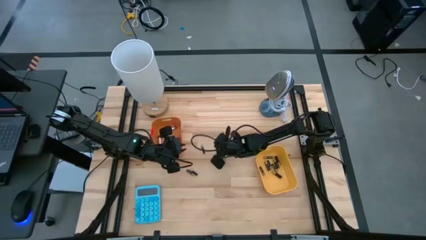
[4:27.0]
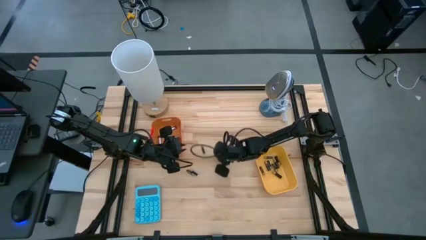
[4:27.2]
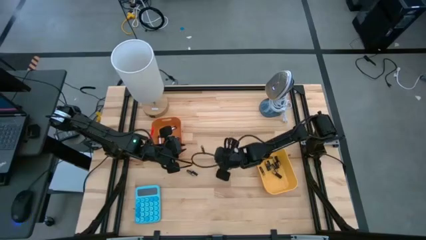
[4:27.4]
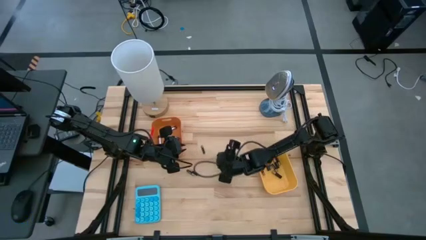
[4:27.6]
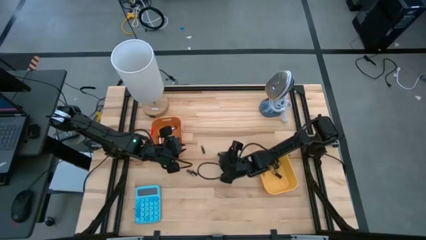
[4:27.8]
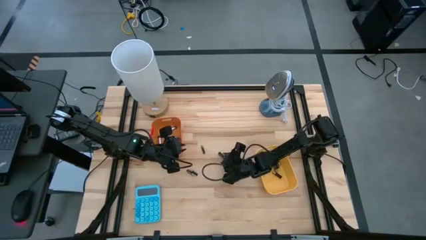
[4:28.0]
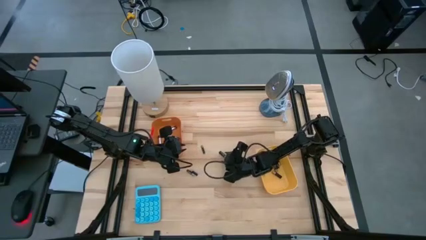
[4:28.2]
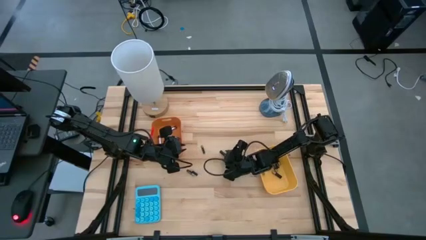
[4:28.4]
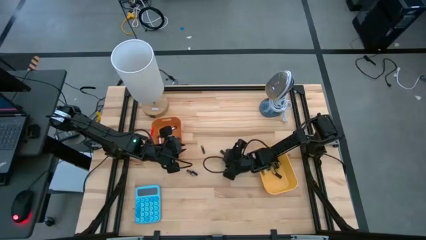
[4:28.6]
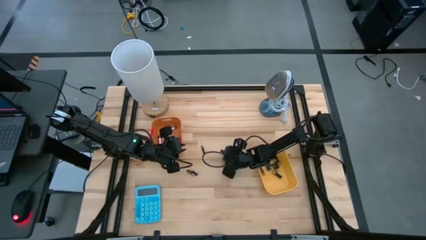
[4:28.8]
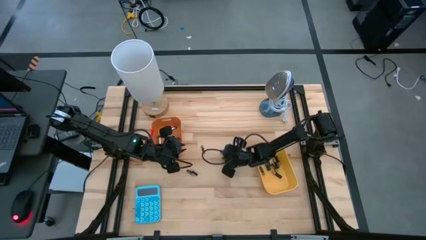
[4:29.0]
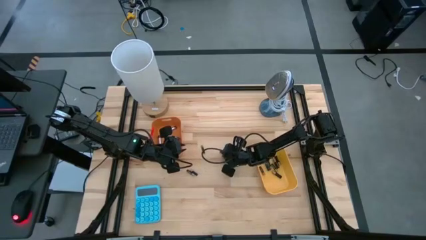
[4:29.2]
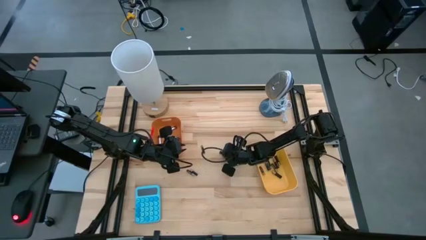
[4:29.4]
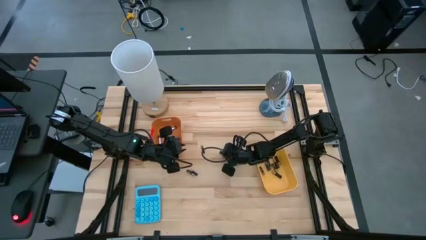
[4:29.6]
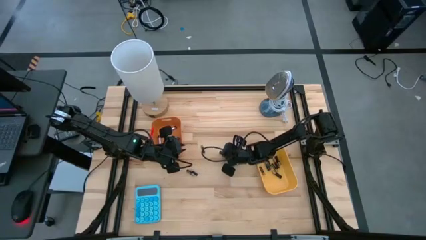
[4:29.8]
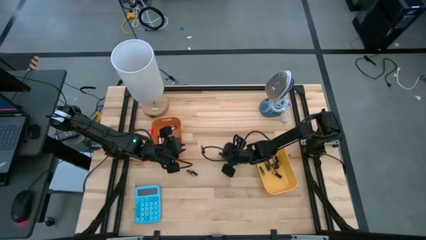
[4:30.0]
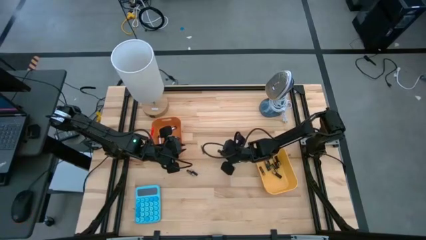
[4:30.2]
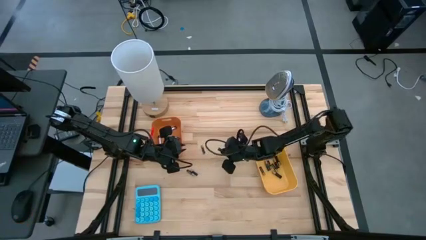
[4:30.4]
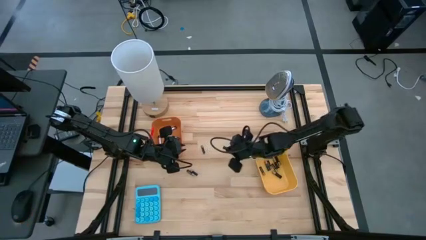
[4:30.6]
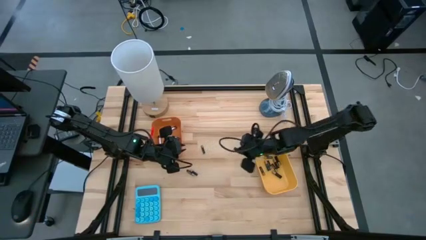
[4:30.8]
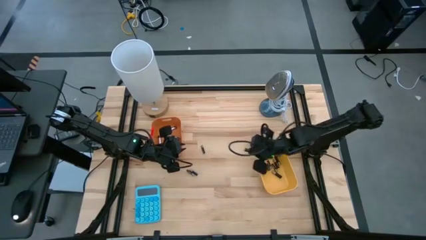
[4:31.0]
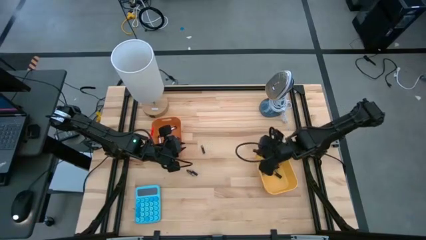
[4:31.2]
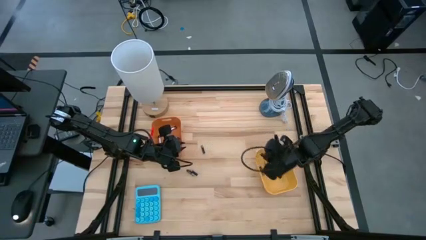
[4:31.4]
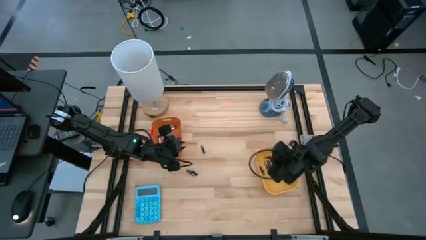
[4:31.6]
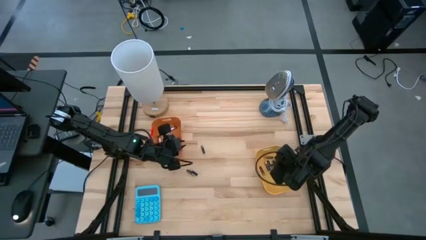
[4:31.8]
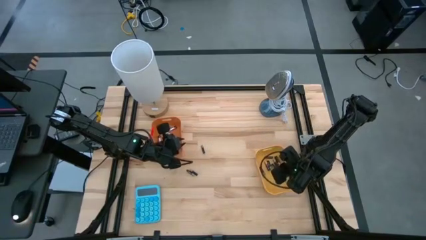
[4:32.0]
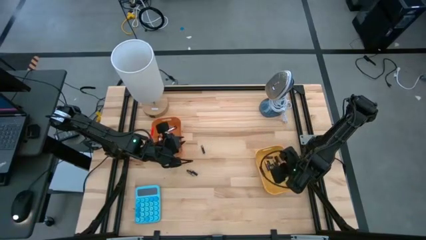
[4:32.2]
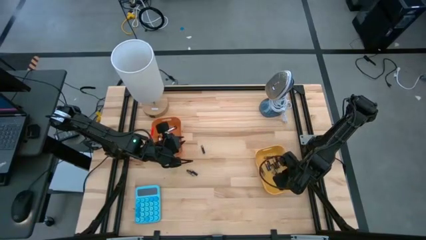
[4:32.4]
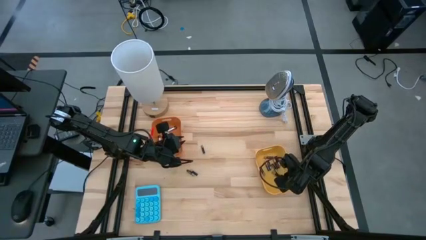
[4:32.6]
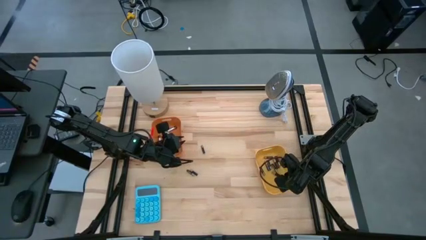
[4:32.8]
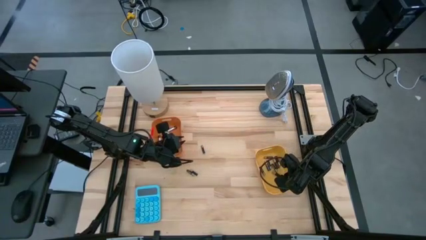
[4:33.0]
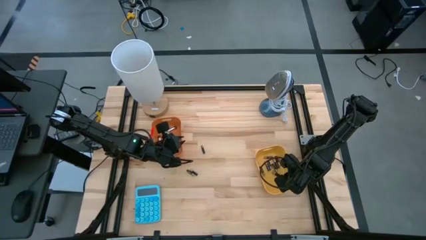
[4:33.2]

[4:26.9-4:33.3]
Task: Sort batteries
Put the gold battery into the yellow bin

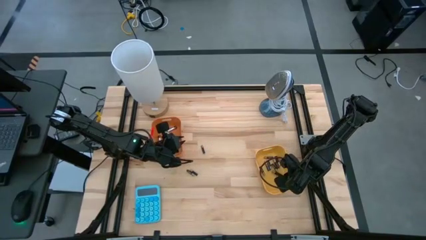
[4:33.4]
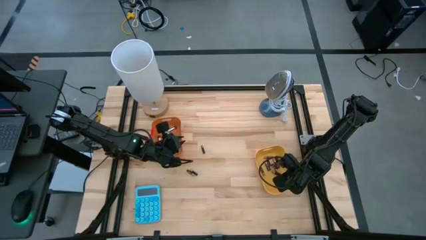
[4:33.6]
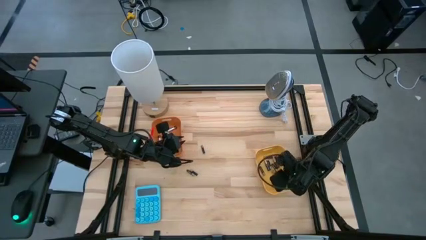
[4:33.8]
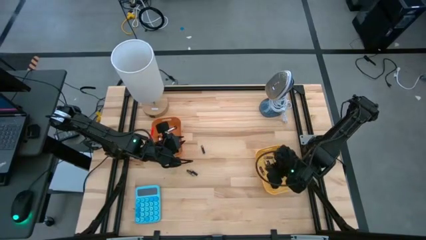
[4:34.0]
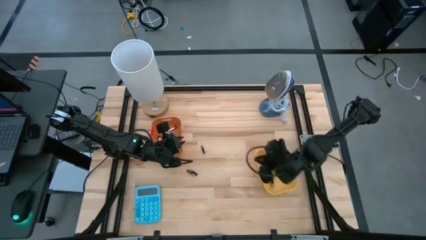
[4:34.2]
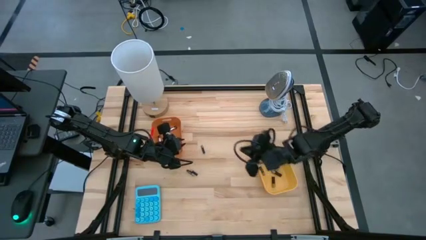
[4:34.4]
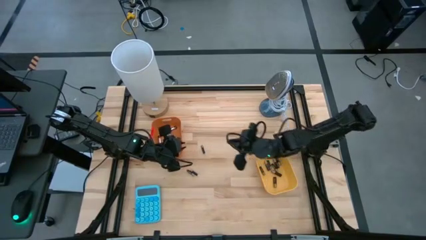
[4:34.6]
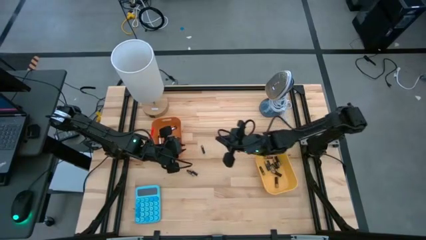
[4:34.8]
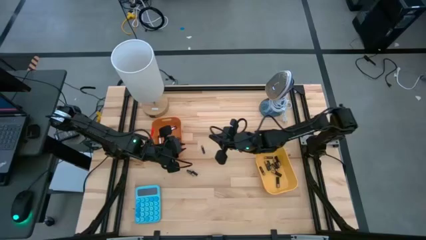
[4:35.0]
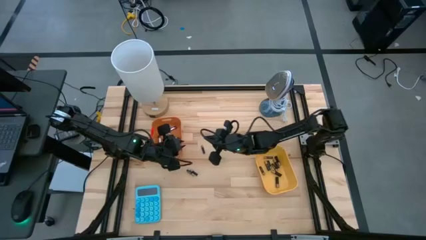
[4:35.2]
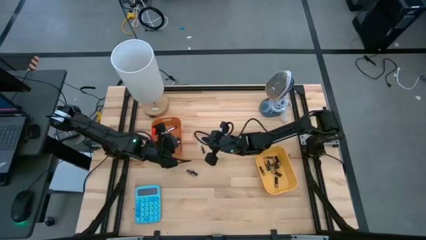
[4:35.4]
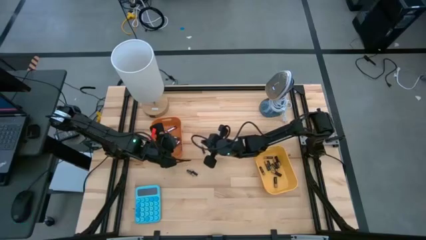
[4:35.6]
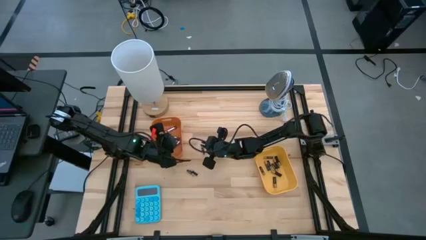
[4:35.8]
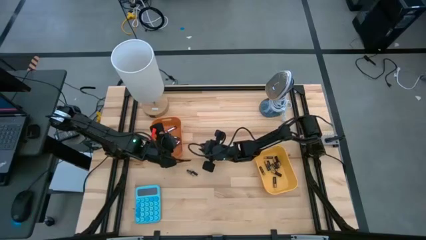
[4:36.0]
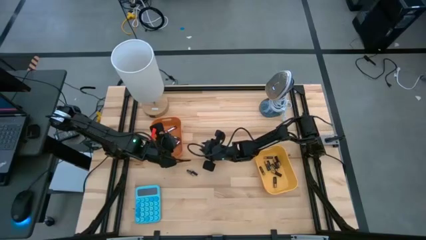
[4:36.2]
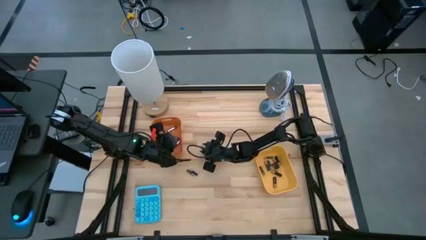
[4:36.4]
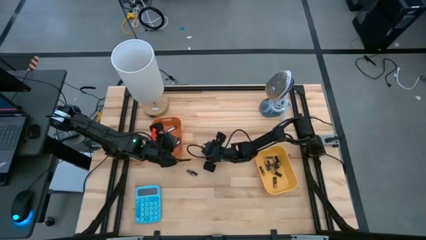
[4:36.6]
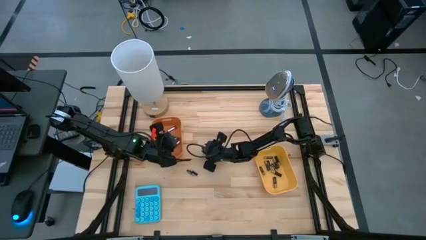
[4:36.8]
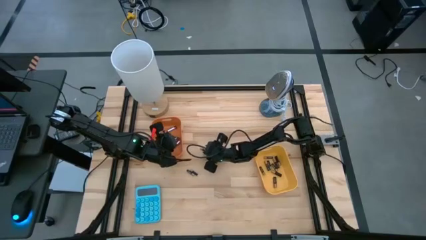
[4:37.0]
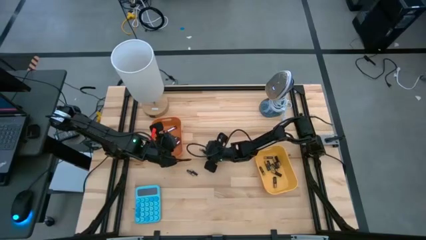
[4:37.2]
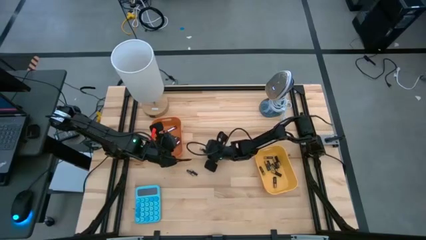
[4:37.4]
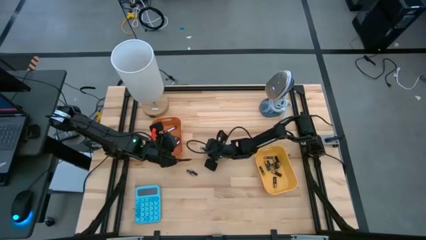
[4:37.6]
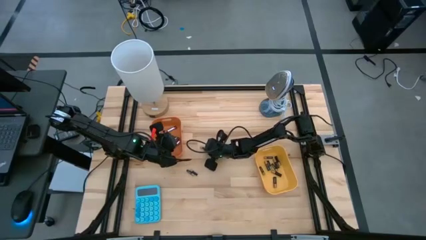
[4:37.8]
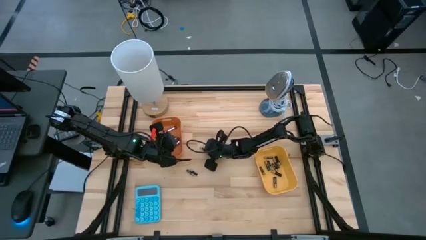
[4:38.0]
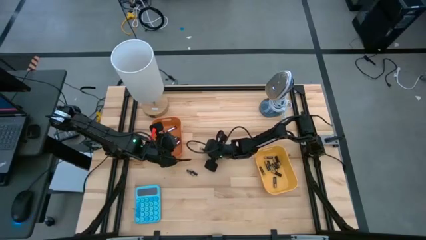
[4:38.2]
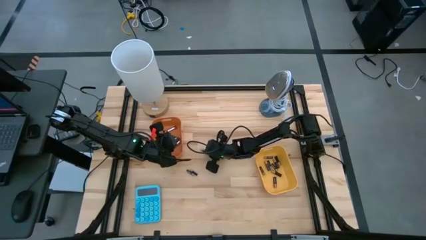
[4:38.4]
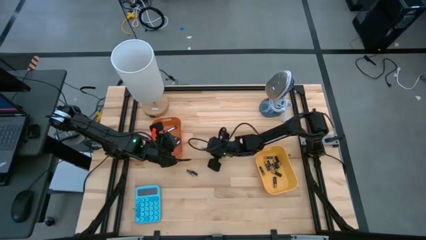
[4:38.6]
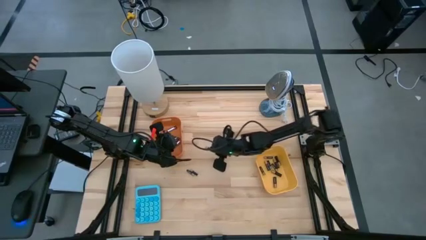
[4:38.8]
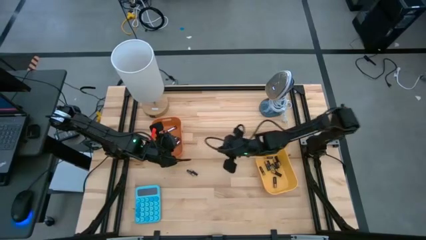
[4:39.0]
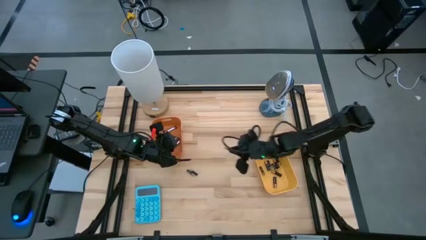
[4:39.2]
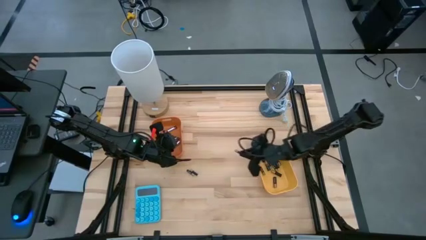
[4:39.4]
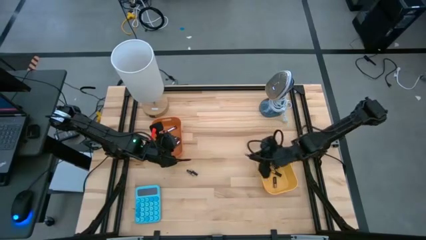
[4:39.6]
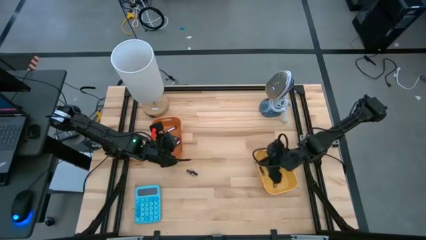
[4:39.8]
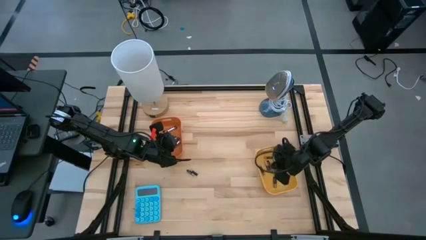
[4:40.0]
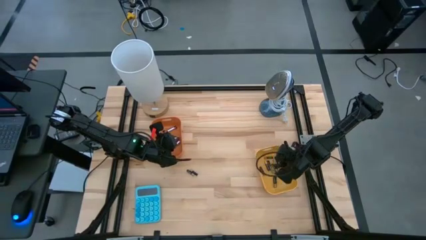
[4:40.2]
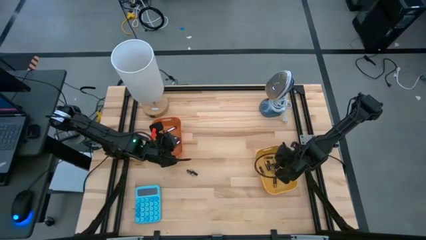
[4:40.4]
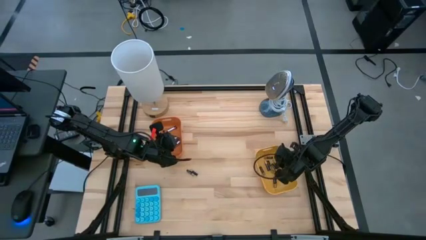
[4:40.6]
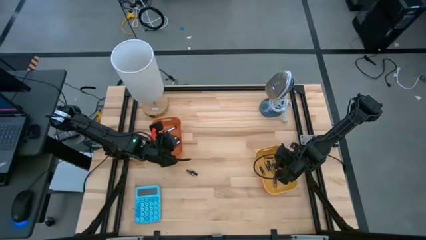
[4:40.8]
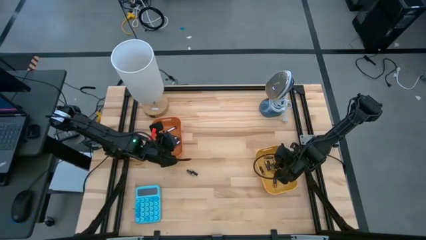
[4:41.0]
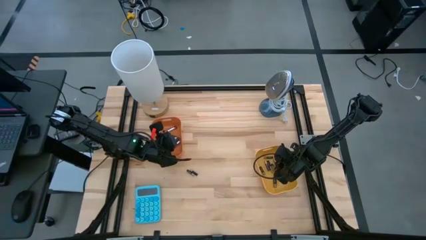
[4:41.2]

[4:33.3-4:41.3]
Put the gold battery into the yellow bin

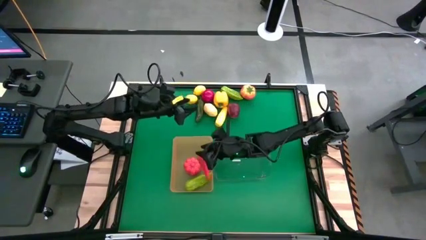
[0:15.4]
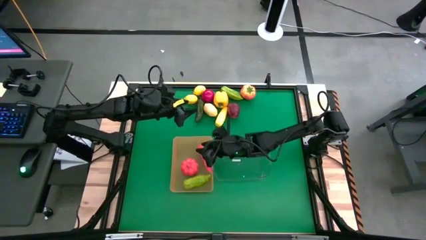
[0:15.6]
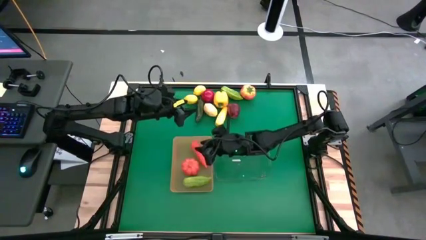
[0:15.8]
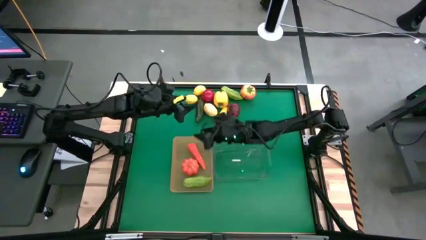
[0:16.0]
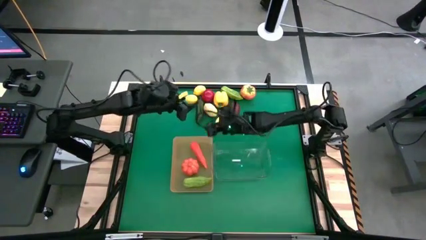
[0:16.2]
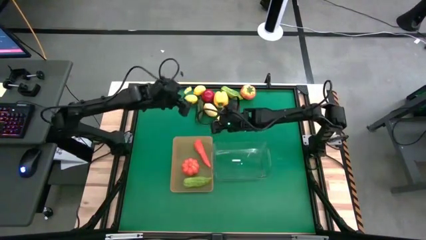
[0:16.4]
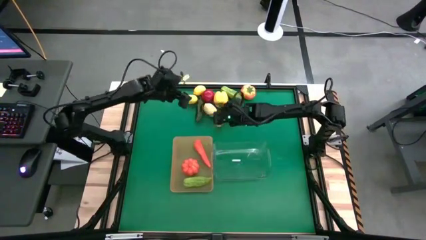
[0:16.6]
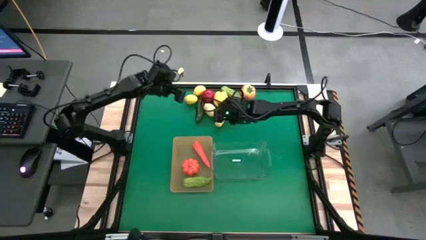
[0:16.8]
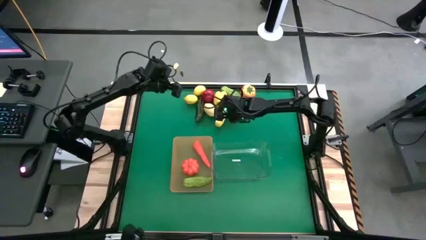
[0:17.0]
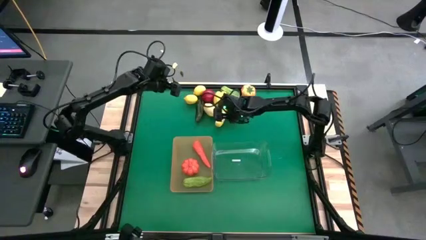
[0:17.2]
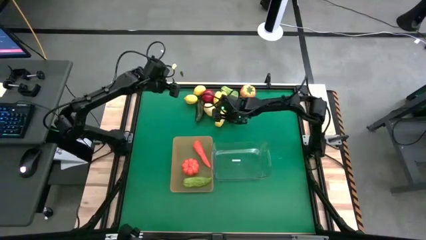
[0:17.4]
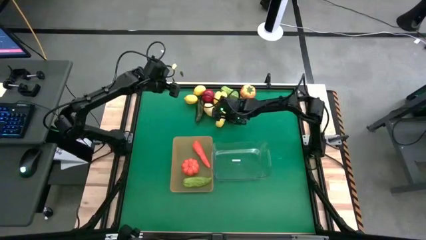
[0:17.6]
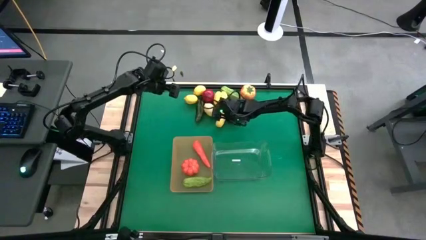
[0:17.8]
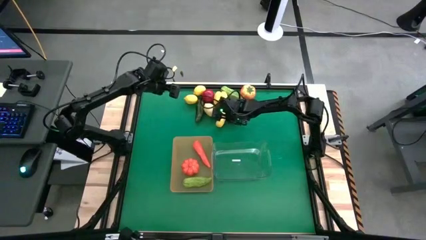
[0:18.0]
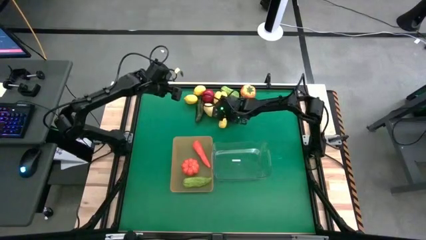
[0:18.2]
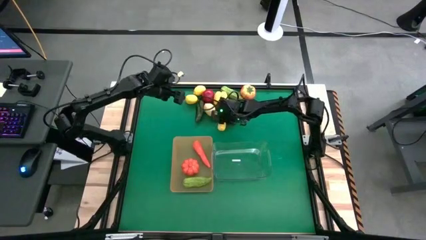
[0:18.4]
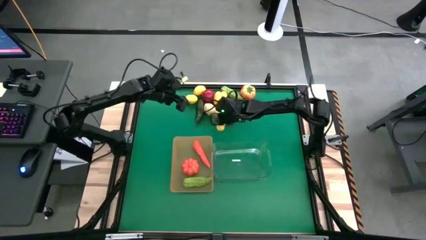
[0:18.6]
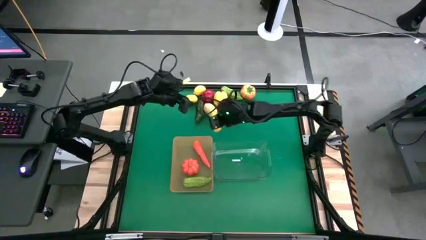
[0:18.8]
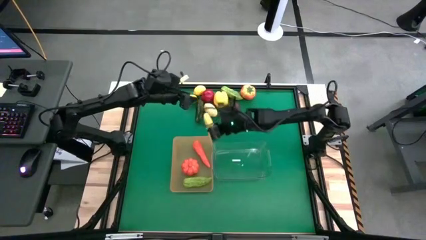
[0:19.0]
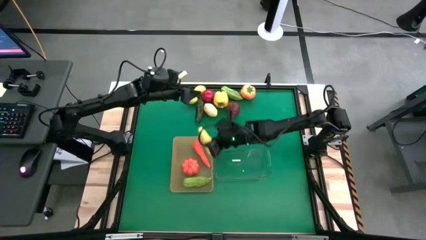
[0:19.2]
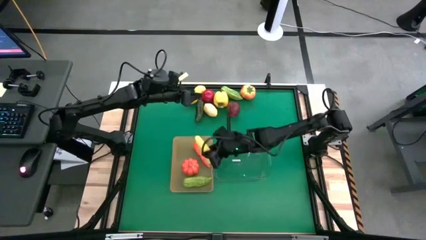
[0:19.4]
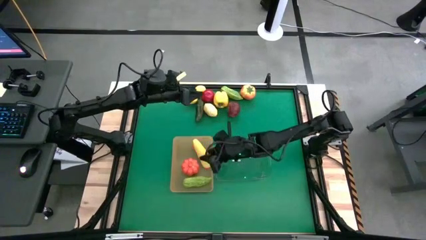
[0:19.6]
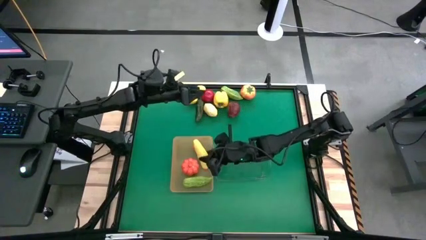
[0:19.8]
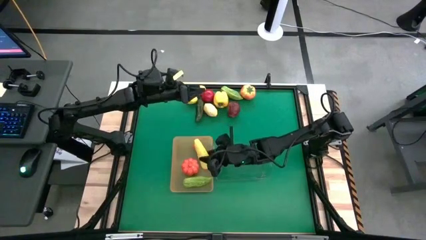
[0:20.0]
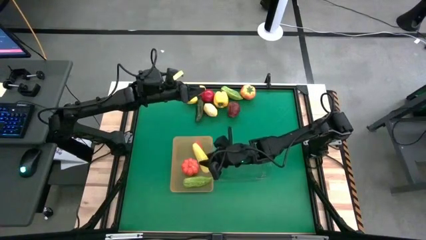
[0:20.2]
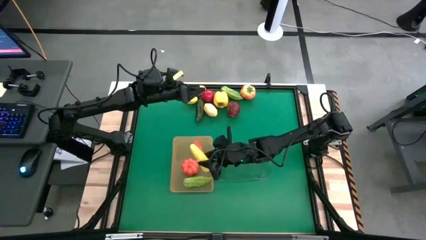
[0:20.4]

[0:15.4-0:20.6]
Task: Sort produce into baskets
Put the corn into the orange bin
